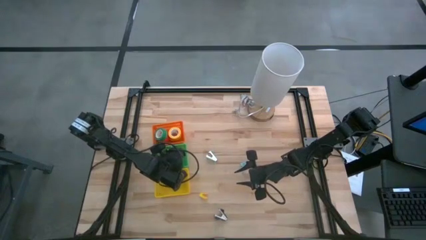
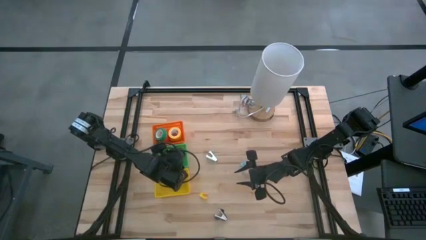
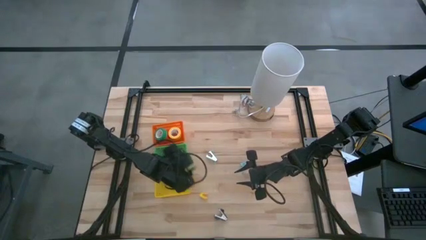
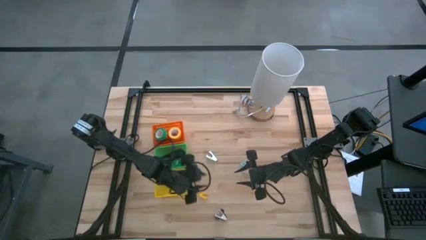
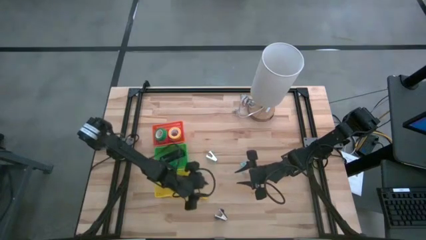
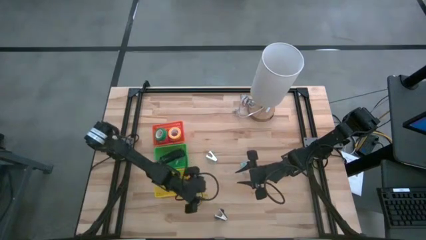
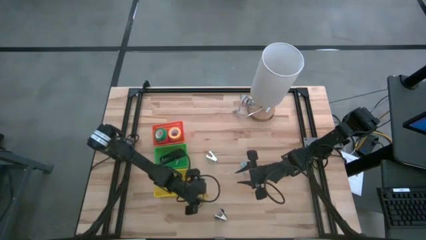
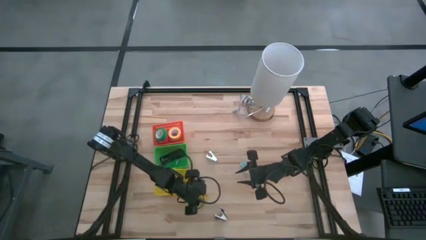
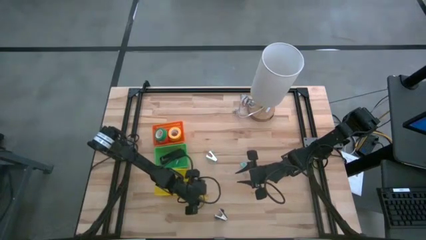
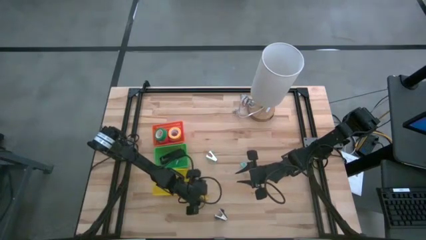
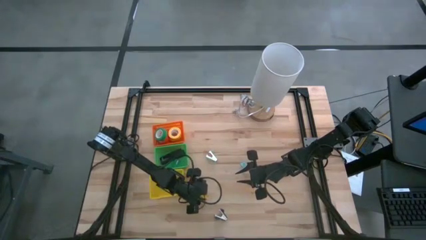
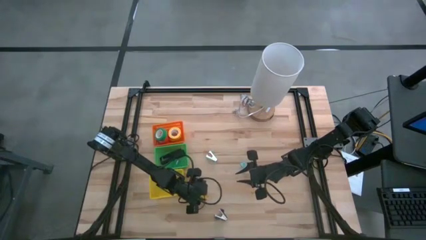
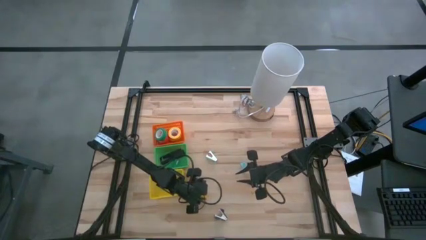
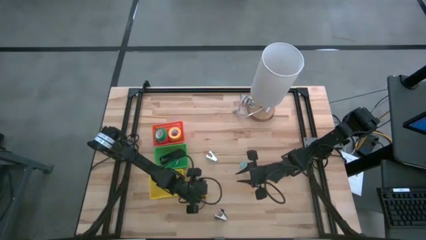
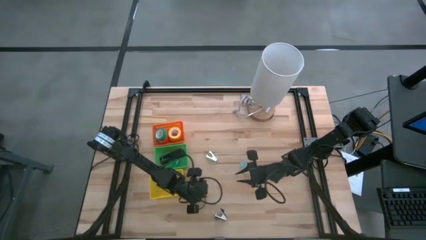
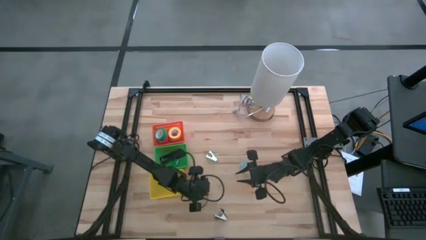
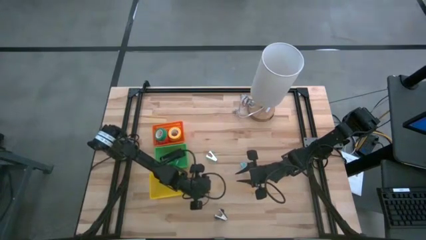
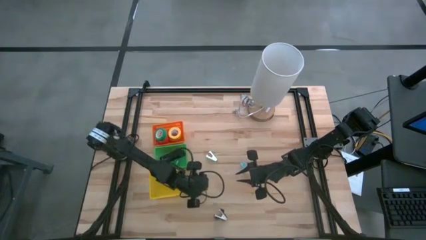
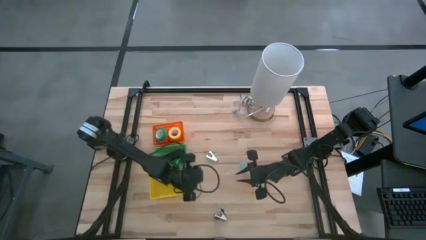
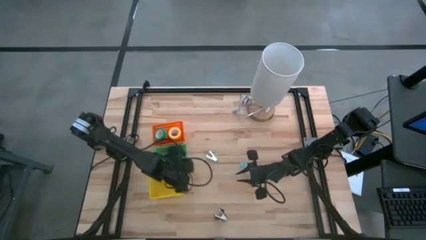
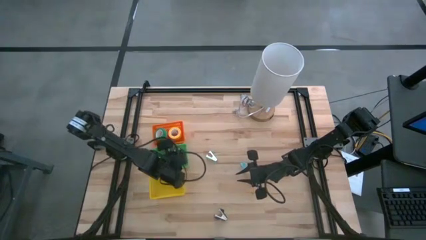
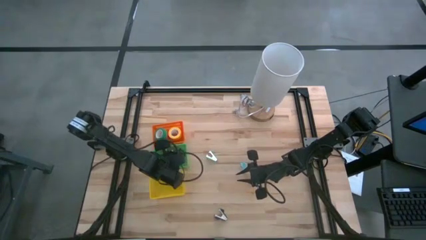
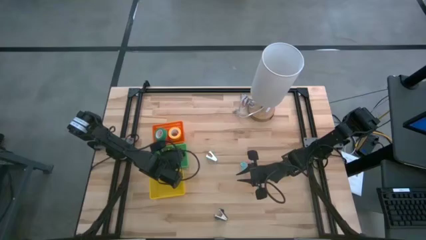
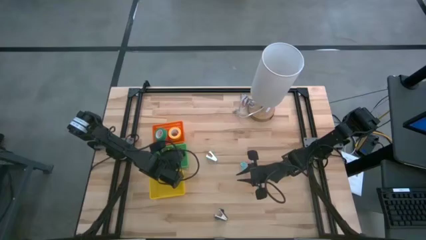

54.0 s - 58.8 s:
Task: Pick and place Stapler, Stapler remover, tape
Put the yellow stapler into the green basket

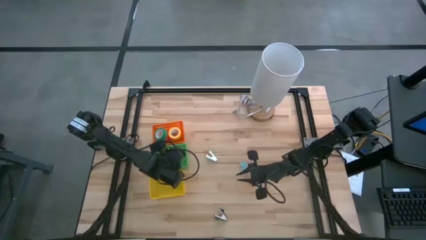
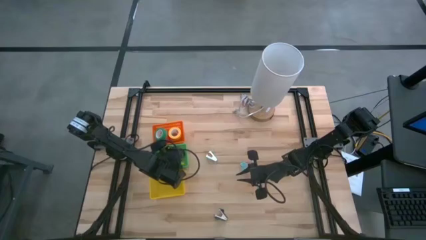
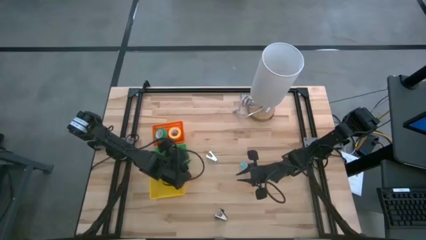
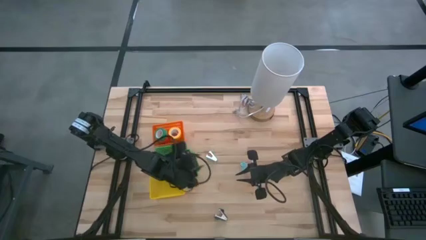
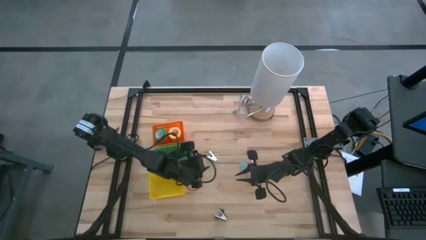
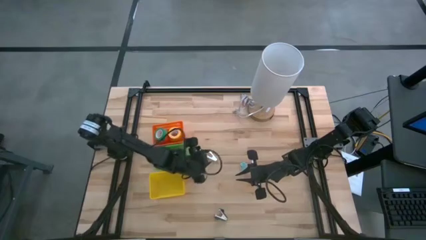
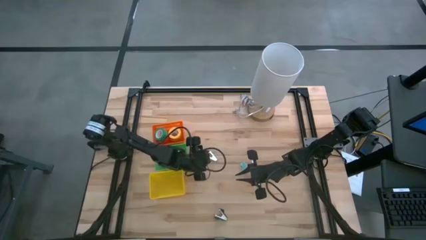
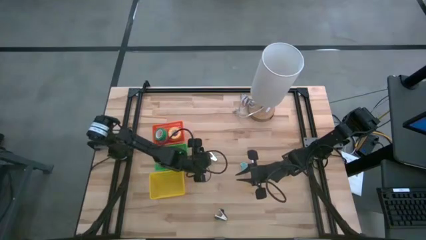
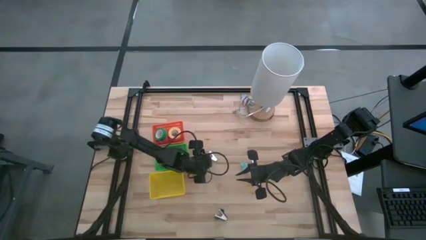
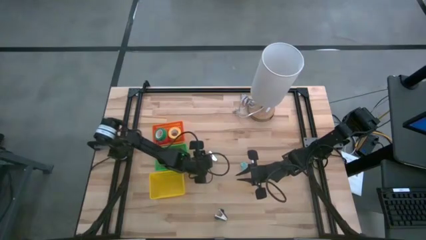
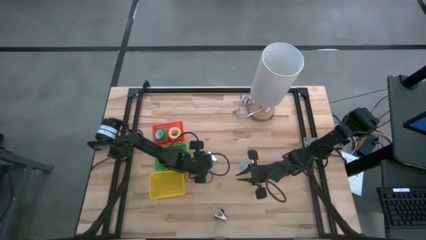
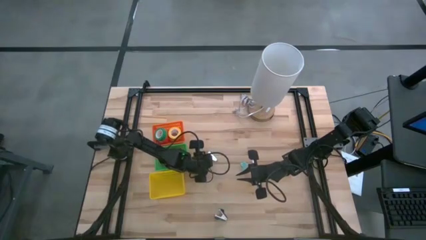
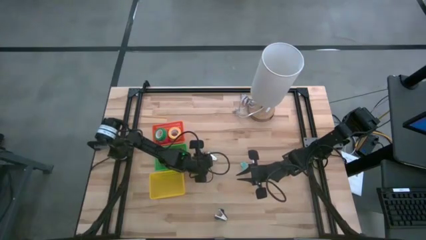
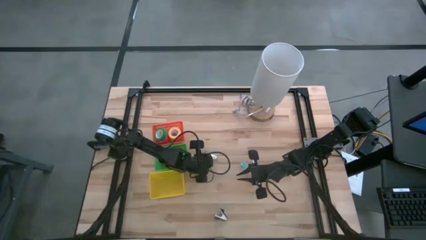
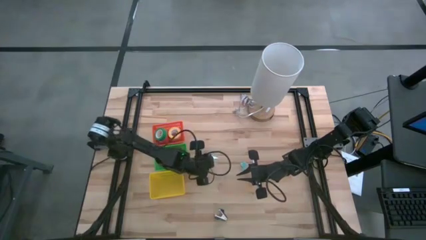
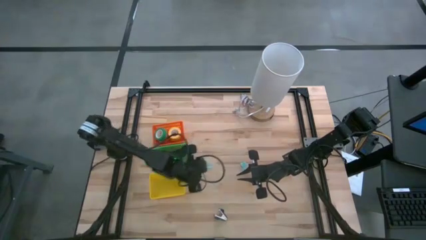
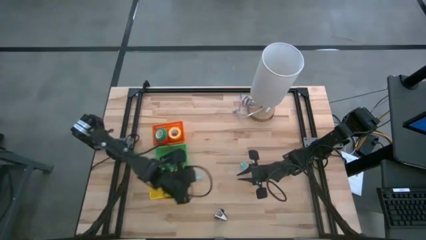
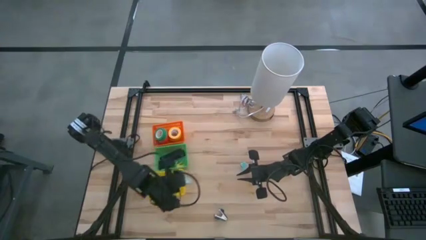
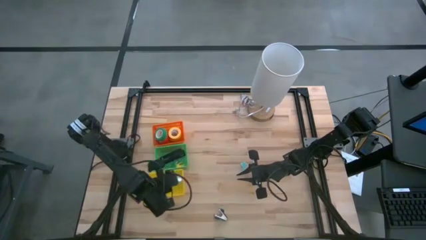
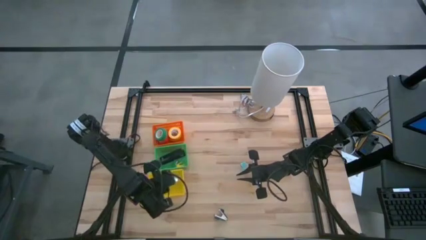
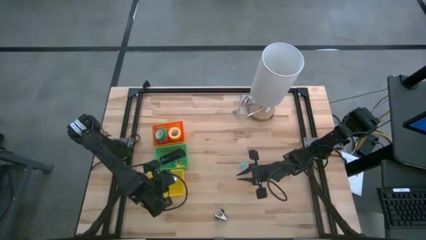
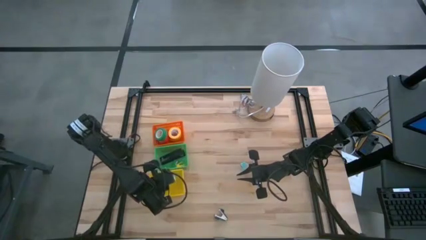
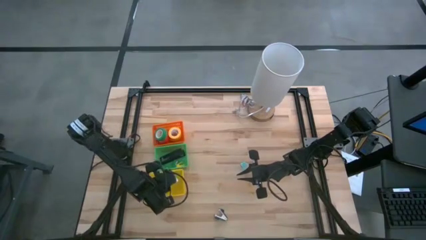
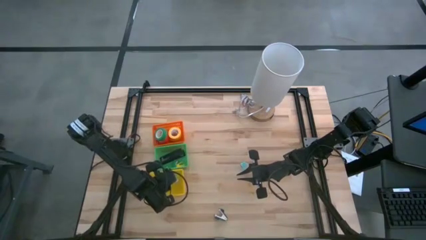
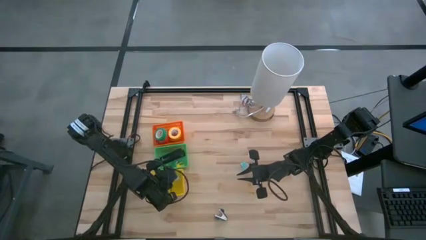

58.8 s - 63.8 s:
Put the light blue staple remover into the yellow basket

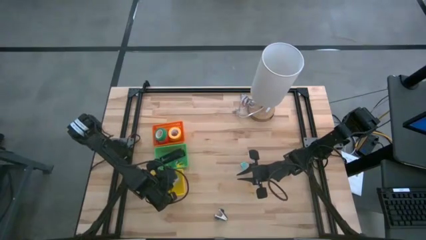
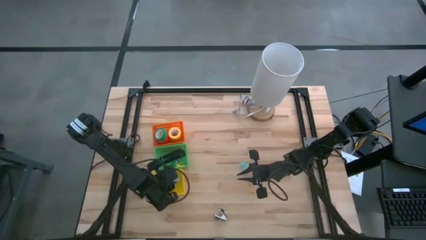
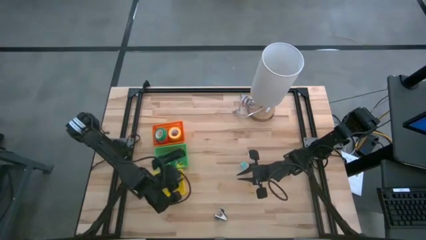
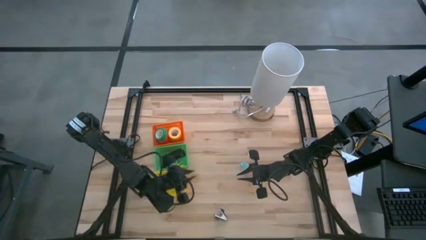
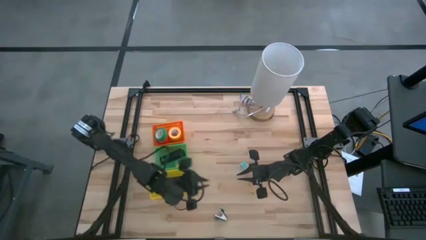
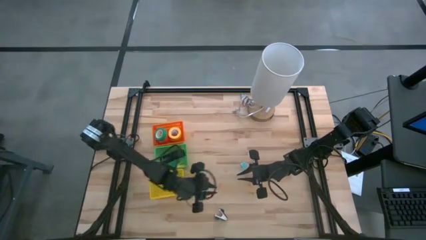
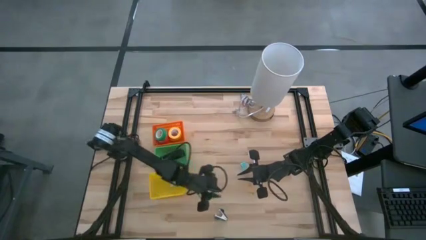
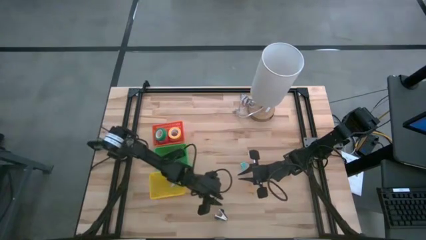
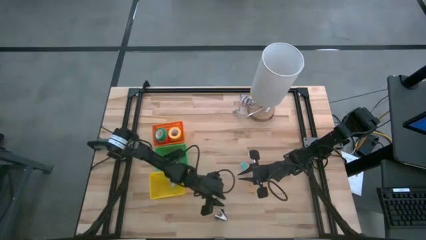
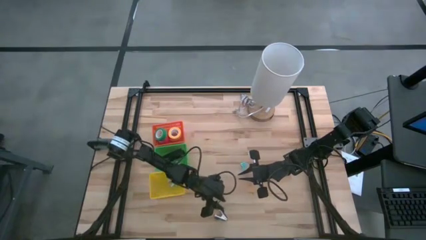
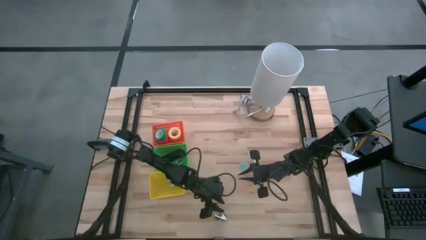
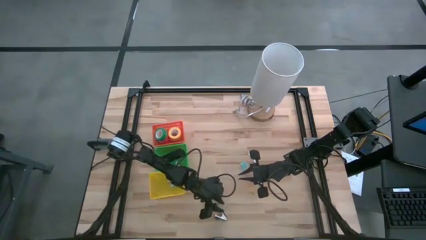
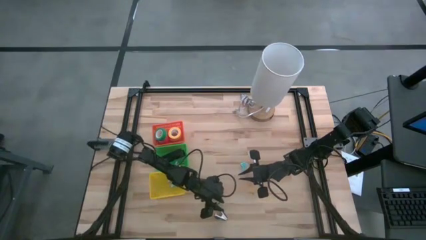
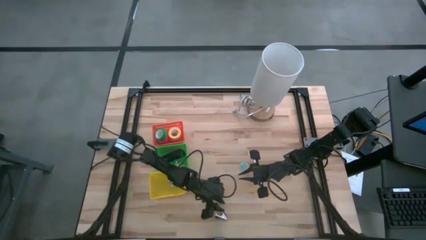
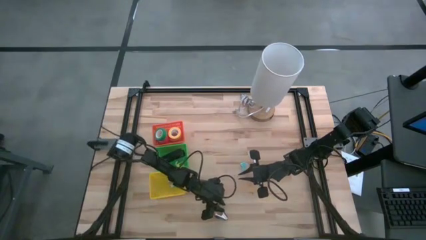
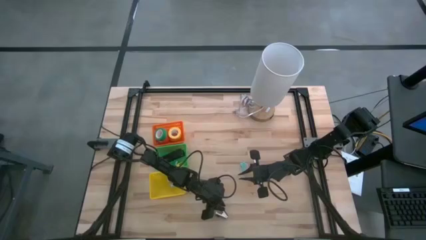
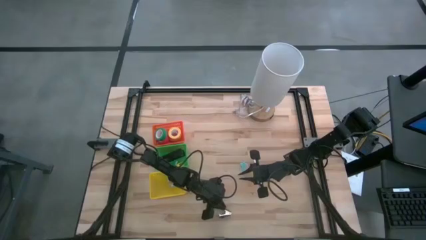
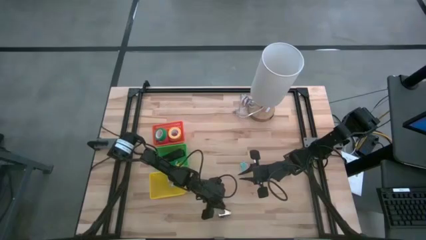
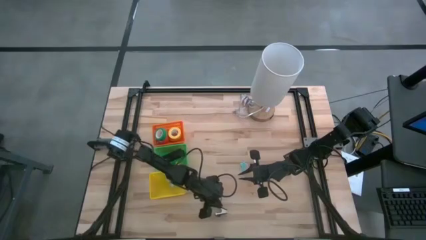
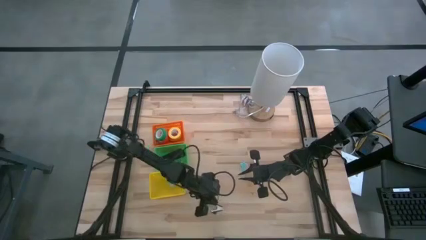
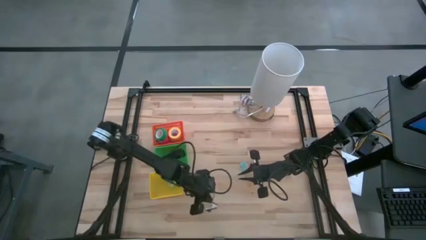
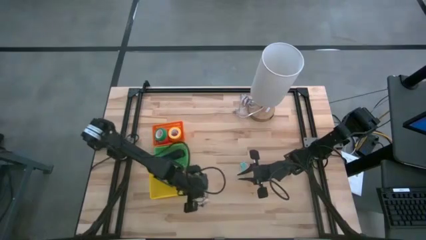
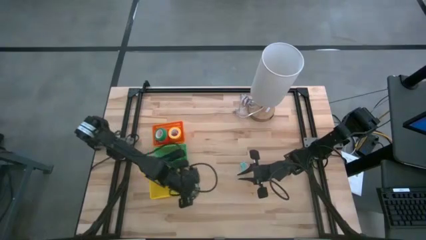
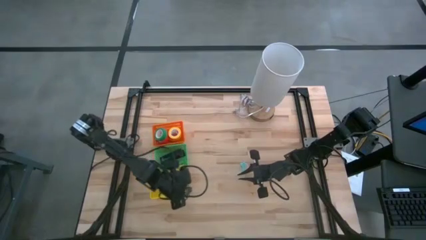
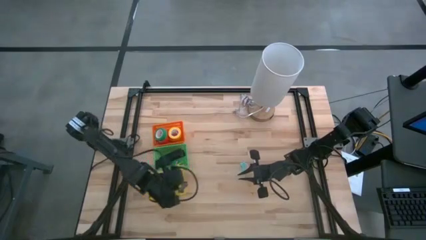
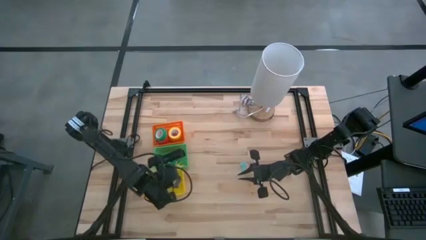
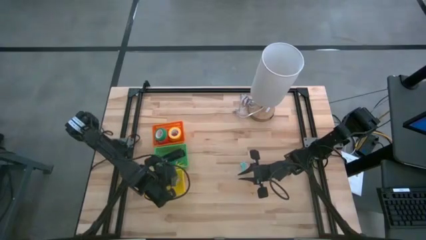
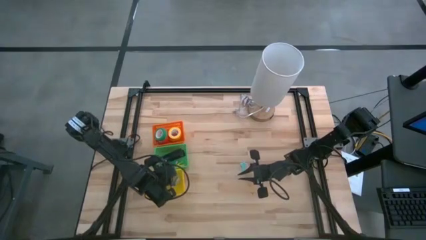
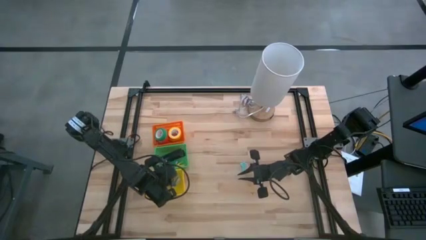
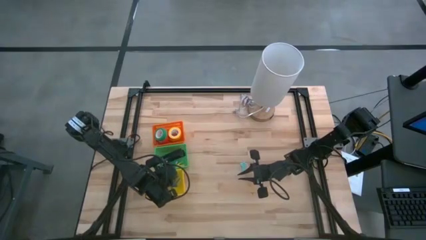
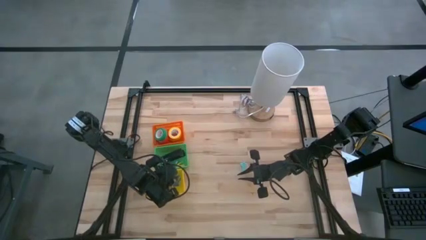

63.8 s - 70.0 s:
Put the gray staple remover into the yellow basket

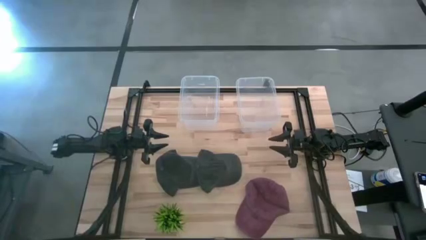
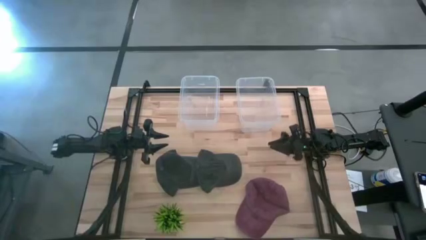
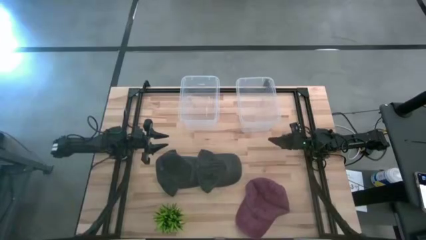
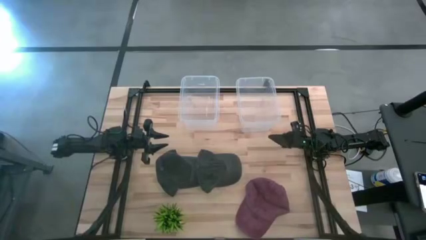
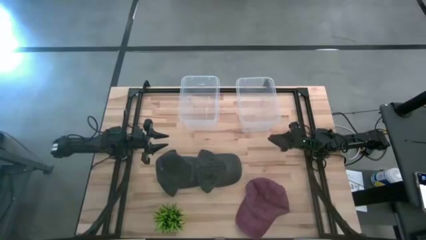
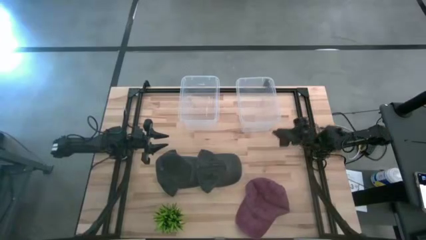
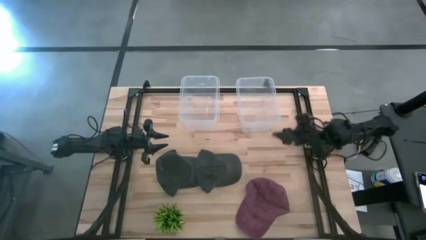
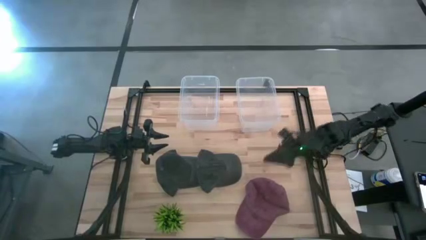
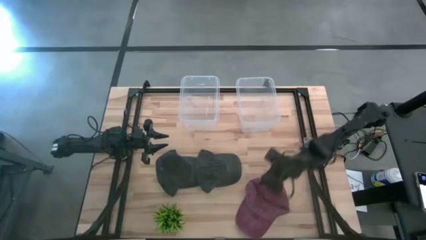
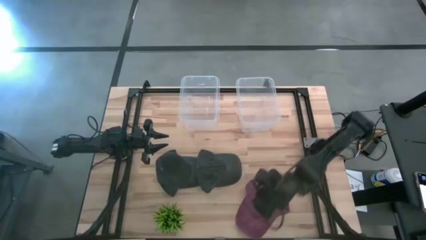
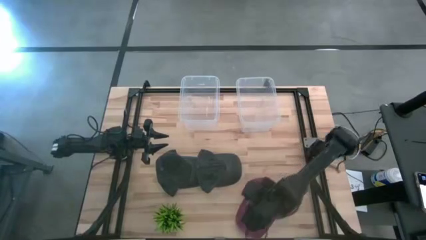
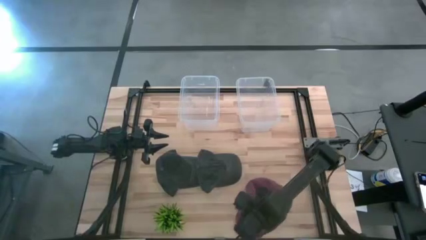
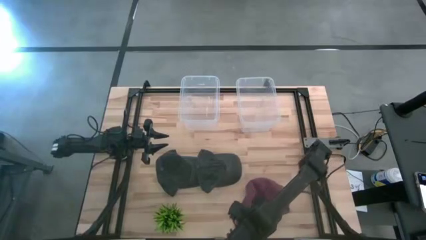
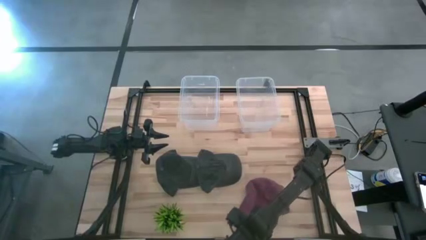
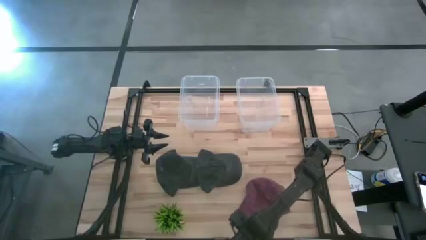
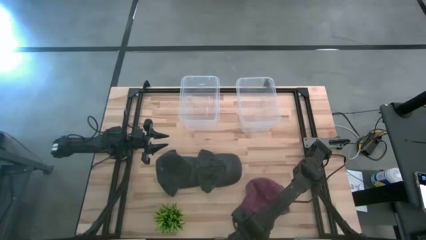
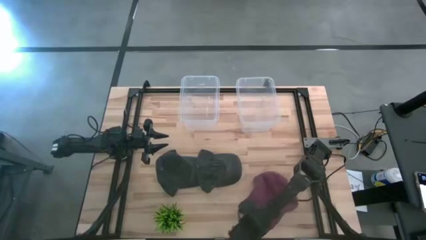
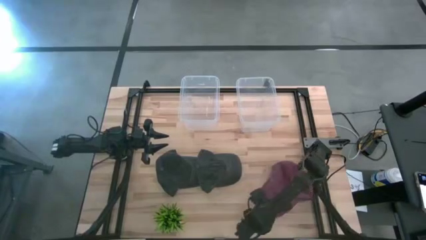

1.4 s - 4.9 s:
Task: Pick & Place hat
Adjust the red cap
